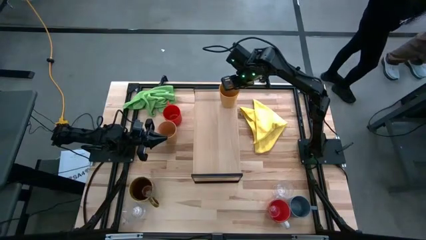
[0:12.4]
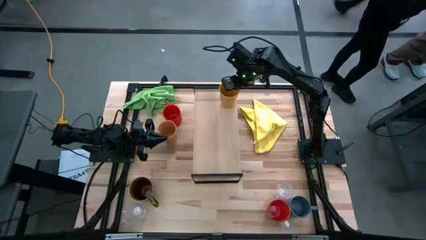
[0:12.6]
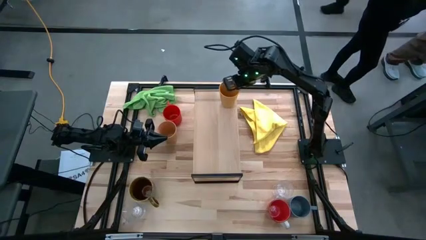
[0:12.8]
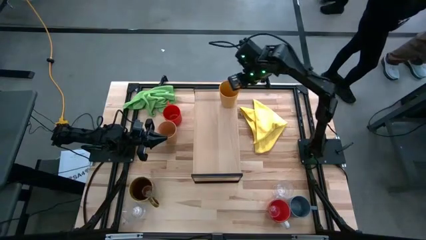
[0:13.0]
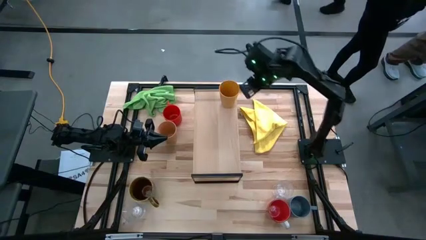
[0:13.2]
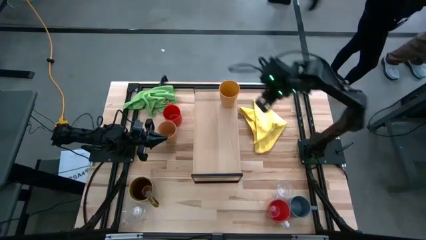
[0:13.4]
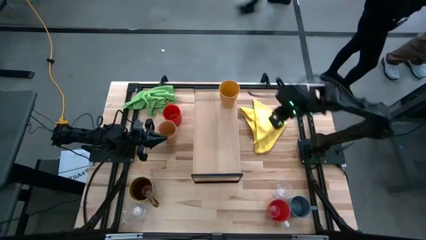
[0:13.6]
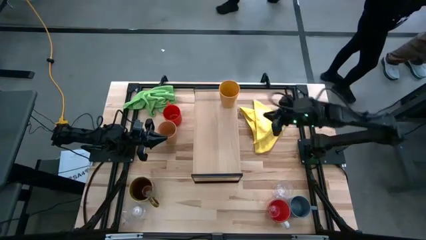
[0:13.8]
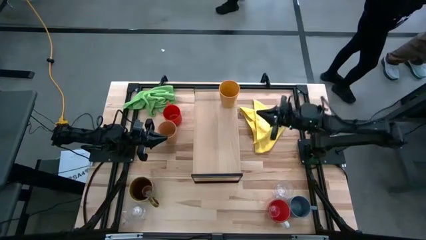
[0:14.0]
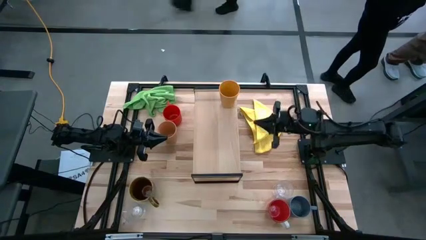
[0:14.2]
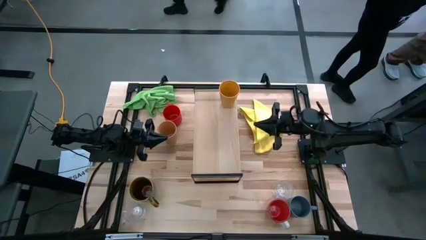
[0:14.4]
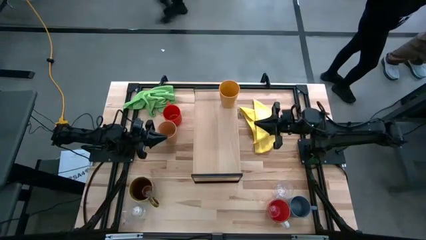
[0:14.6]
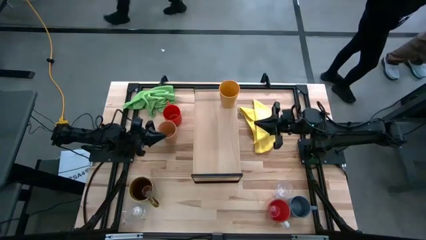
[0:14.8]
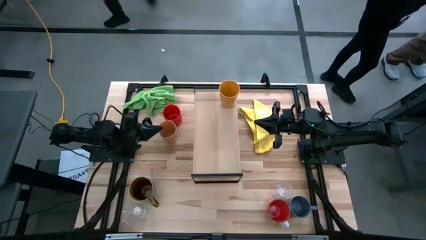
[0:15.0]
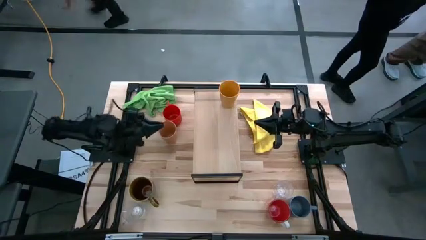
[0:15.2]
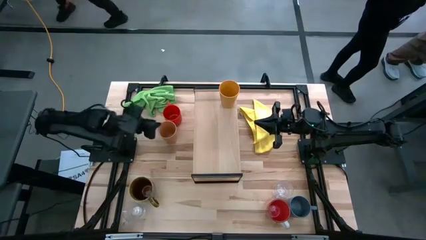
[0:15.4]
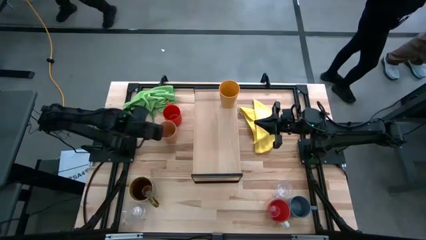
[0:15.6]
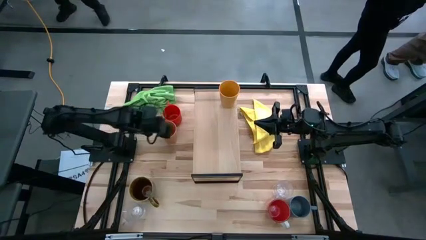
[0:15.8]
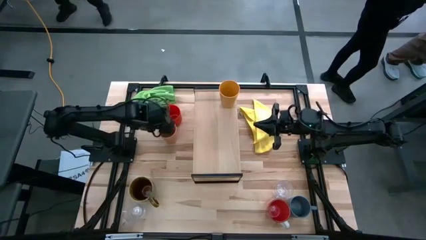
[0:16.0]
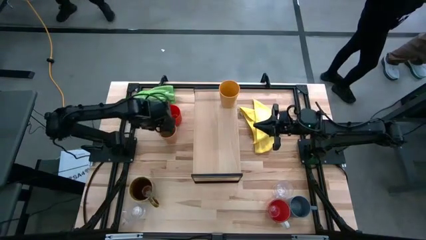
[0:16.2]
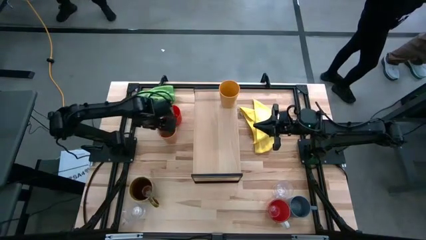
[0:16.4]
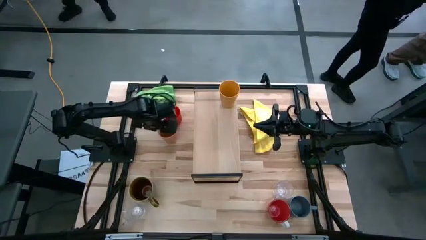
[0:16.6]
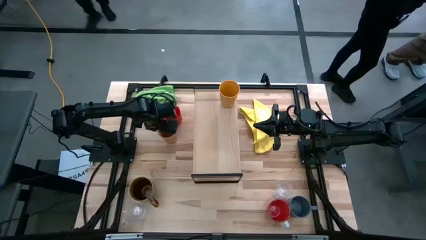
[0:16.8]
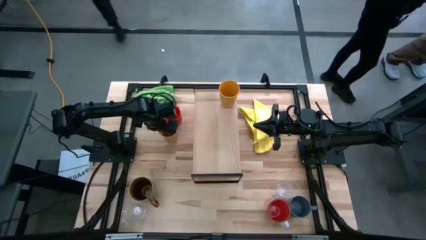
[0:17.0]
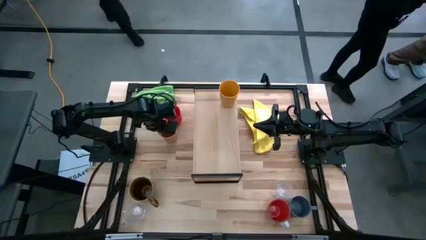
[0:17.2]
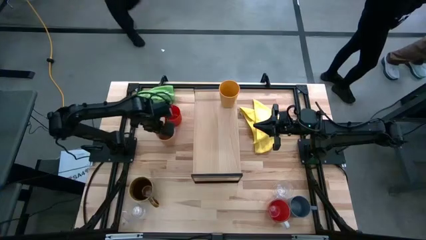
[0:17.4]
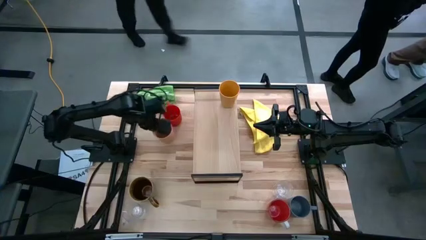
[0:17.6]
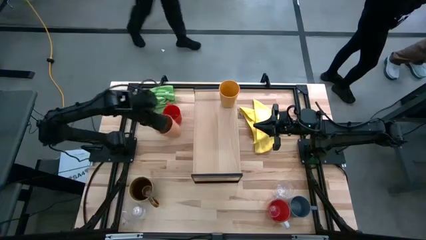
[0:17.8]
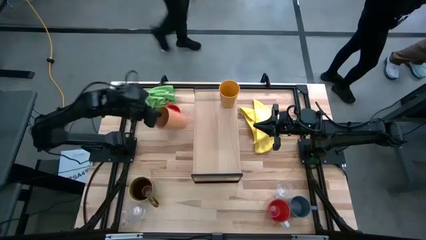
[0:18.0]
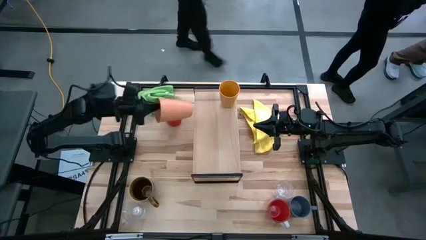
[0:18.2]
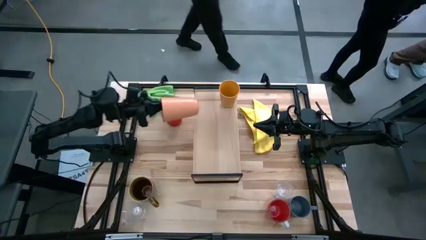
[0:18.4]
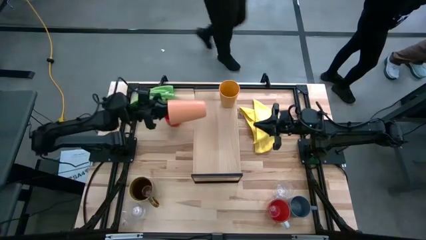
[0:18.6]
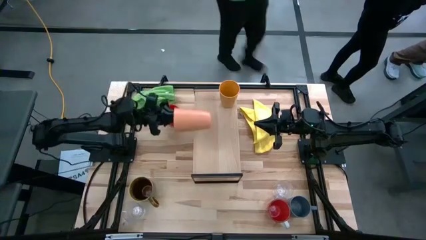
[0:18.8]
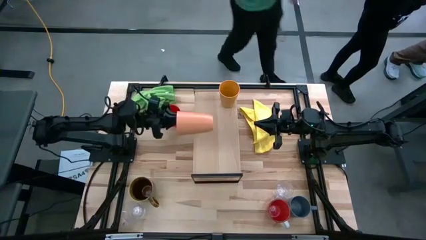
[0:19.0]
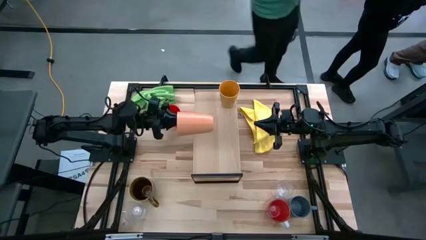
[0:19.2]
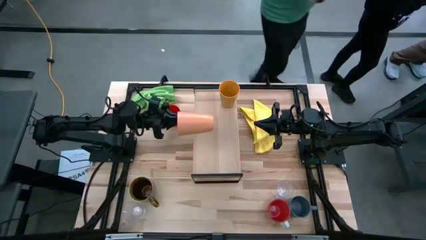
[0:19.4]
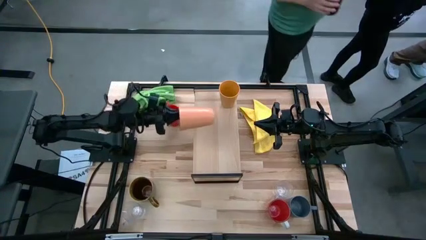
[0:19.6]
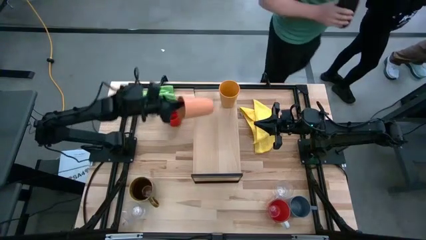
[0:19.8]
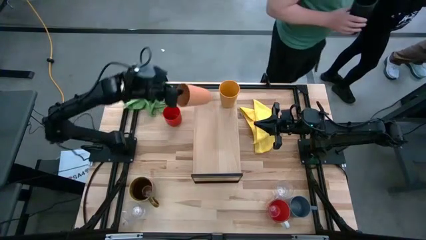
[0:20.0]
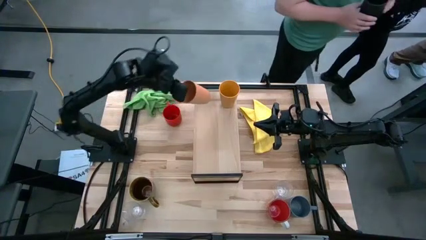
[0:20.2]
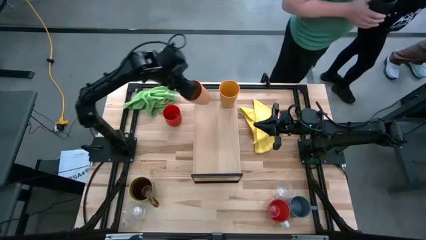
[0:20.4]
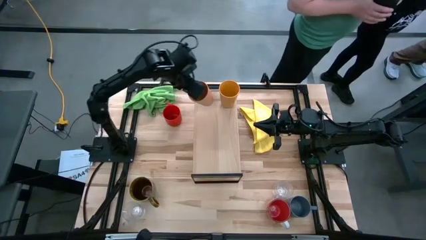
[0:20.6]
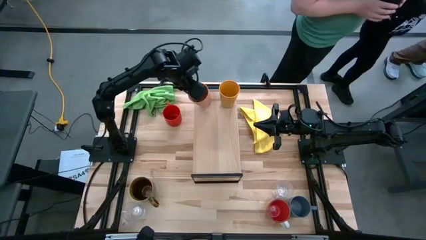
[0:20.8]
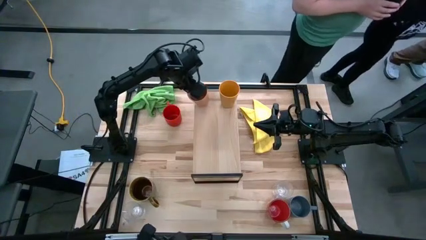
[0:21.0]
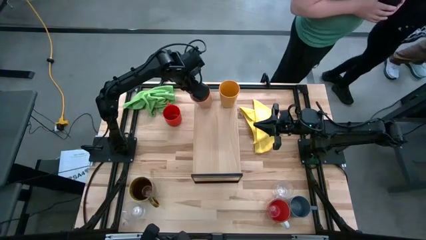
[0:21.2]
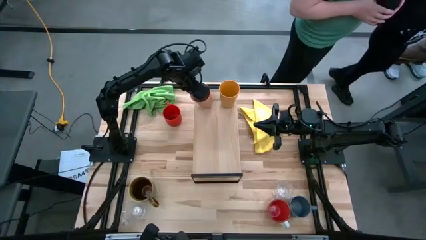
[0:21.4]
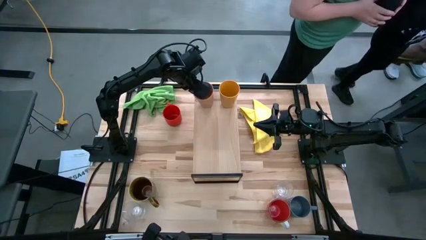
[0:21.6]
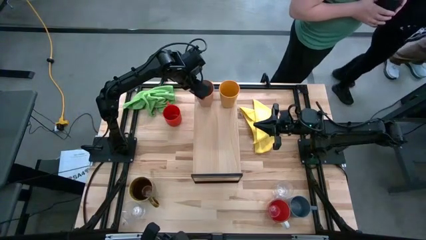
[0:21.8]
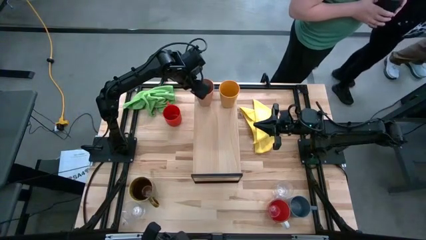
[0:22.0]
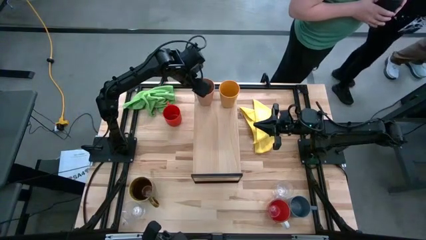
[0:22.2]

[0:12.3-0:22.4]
Task: Stack small to large cups/mugs on shelf
Put the orange cup on the shelf

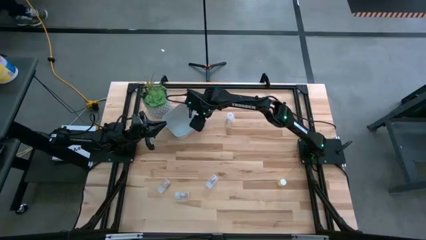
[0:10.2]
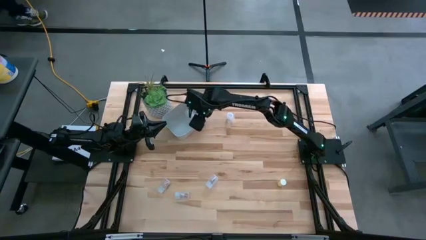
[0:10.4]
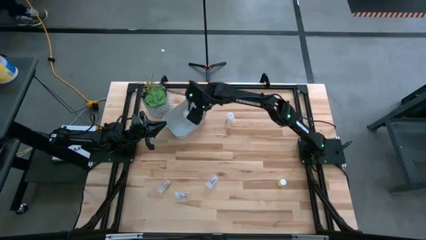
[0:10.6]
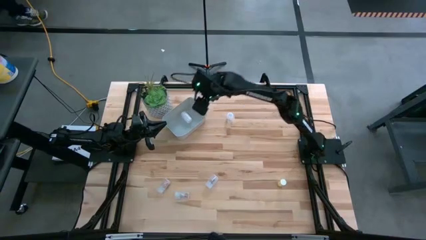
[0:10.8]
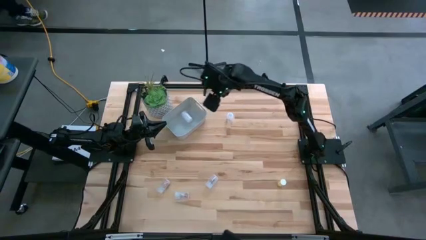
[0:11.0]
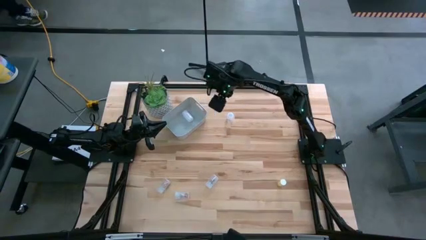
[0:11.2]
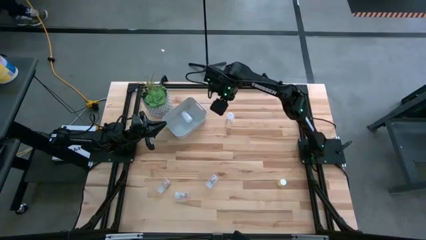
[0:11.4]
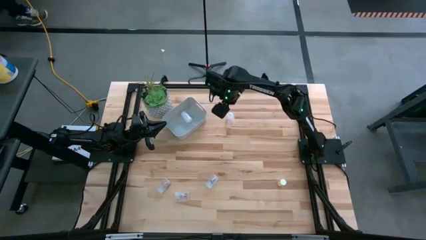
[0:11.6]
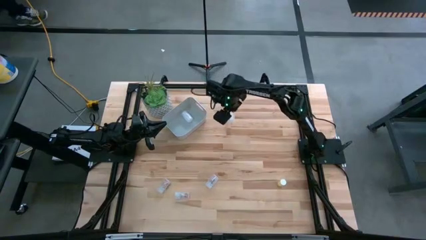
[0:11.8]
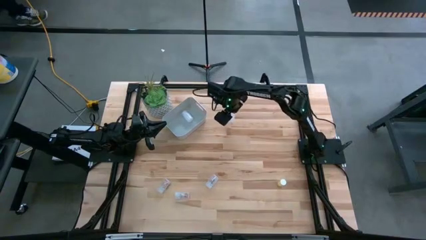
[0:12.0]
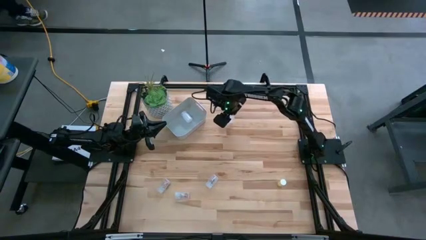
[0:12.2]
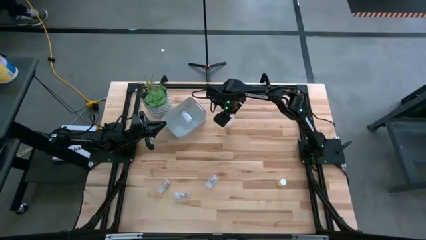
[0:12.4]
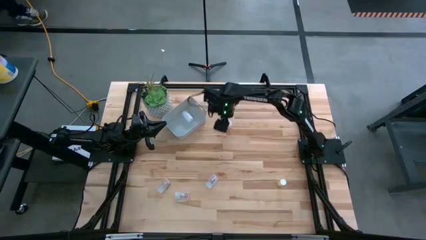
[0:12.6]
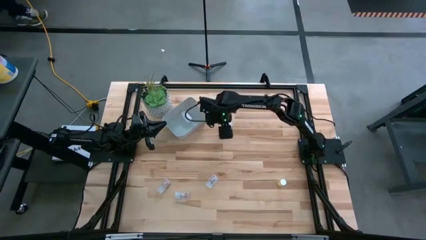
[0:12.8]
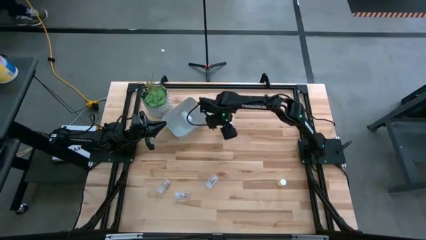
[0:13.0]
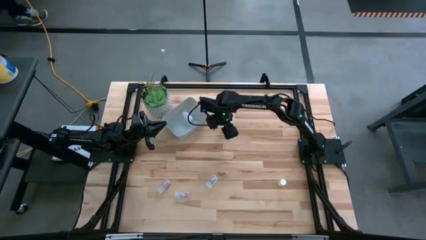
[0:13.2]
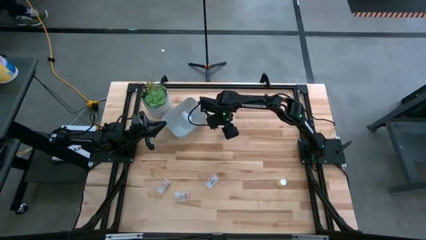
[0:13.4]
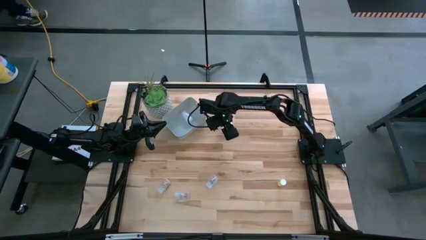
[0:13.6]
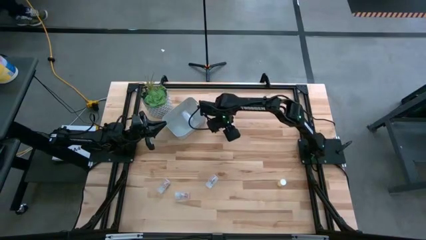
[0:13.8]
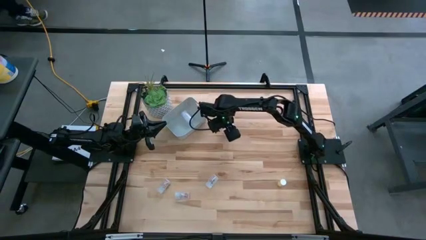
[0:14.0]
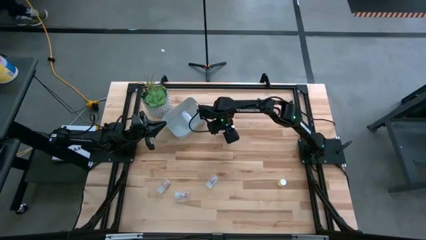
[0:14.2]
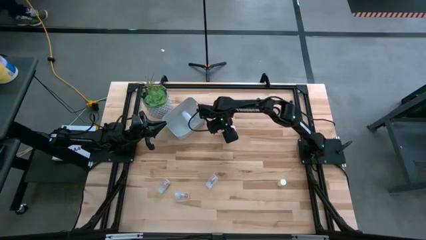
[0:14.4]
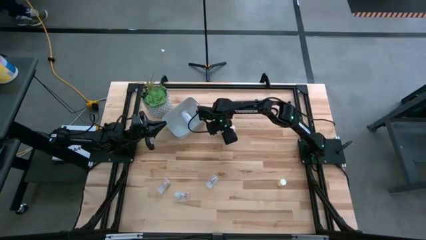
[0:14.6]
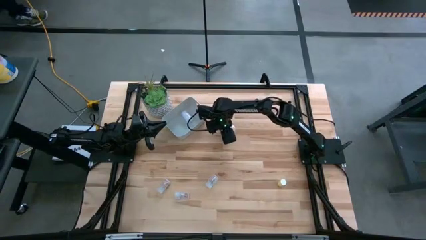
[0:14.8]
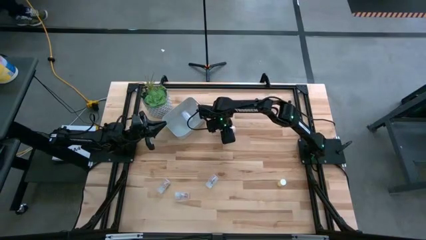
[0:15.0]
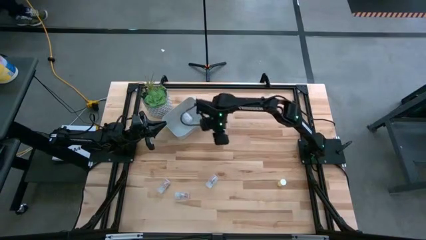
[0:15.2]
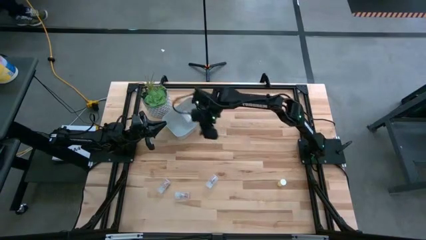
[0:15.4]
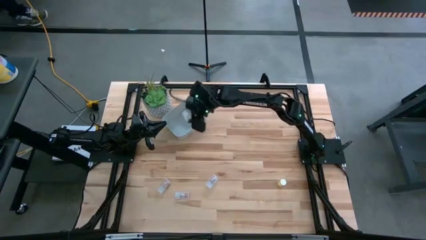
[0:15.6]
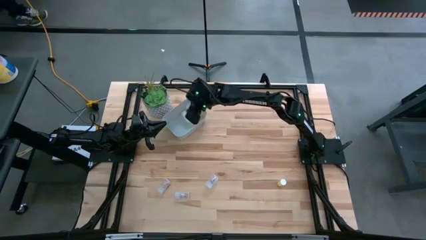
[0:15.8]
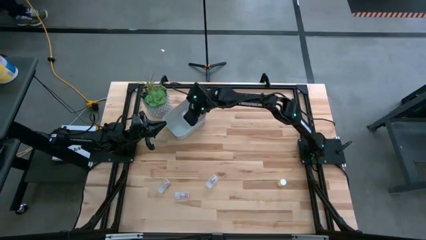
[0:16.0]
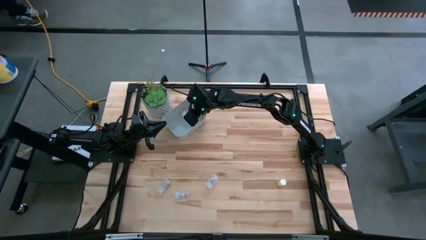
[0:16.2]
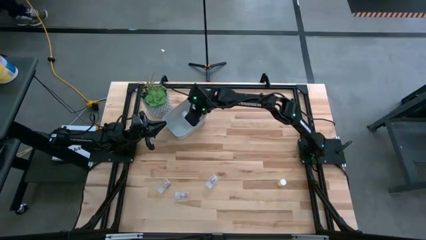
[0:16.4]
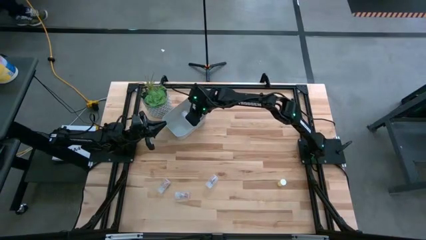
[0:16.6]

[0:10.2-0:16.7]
Task: Pick and place pill bottles into a basket
Put the transparent pill bottle into the bin
